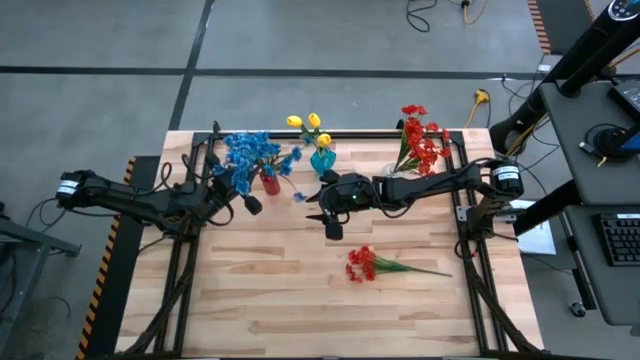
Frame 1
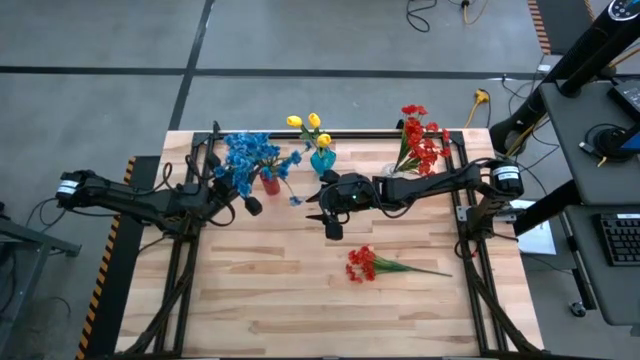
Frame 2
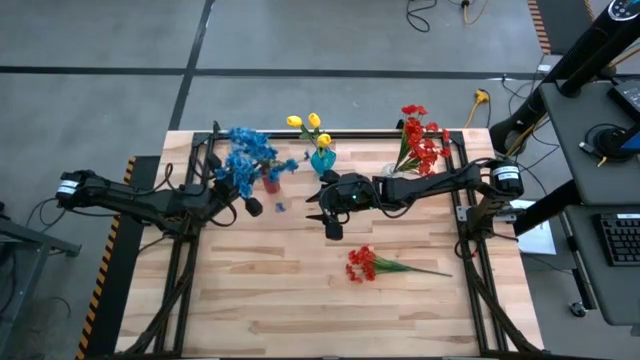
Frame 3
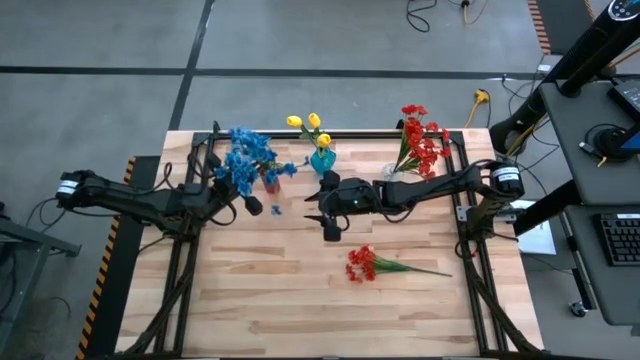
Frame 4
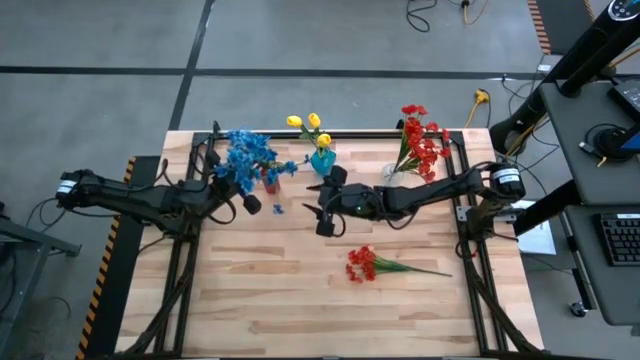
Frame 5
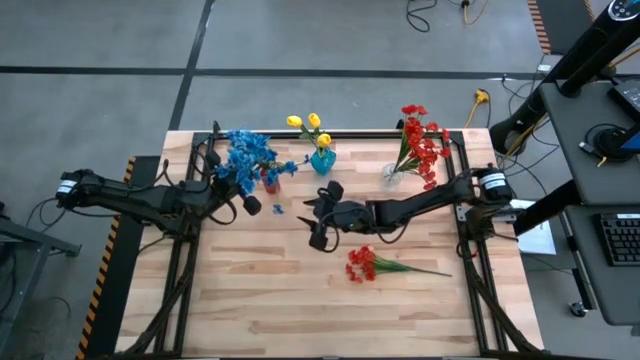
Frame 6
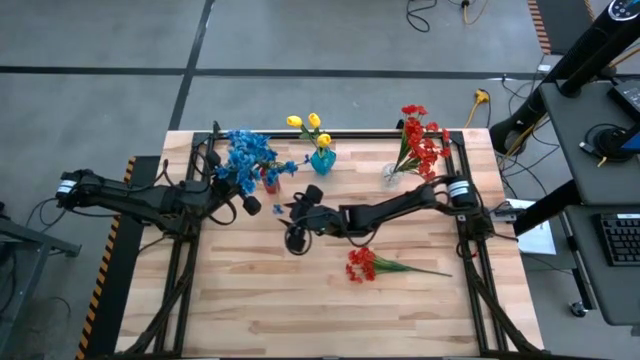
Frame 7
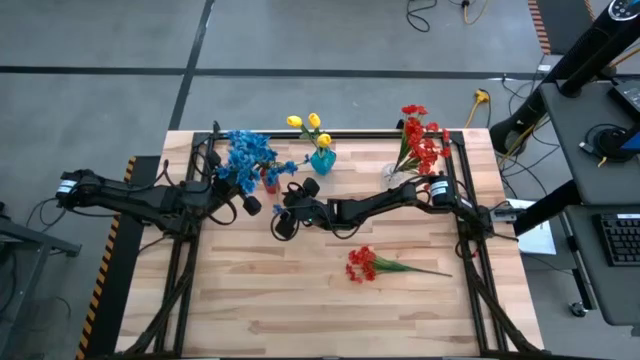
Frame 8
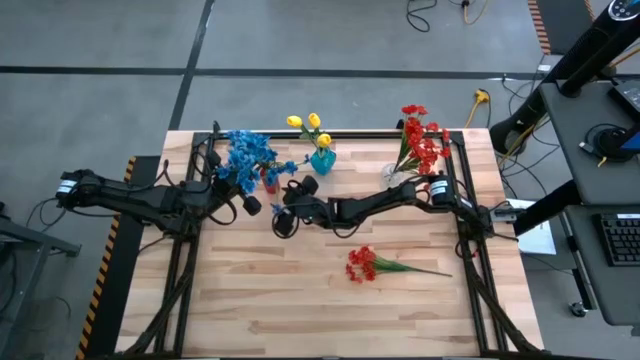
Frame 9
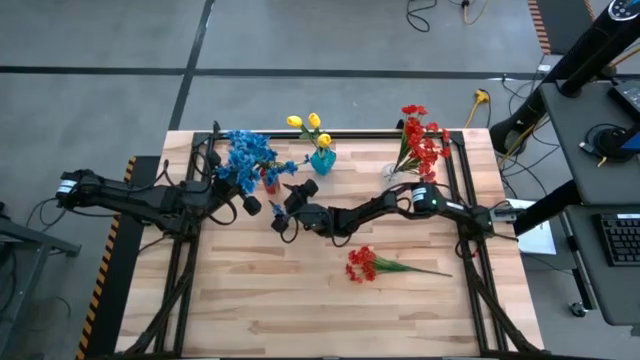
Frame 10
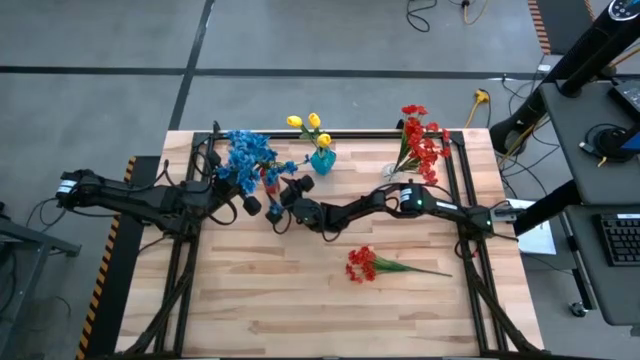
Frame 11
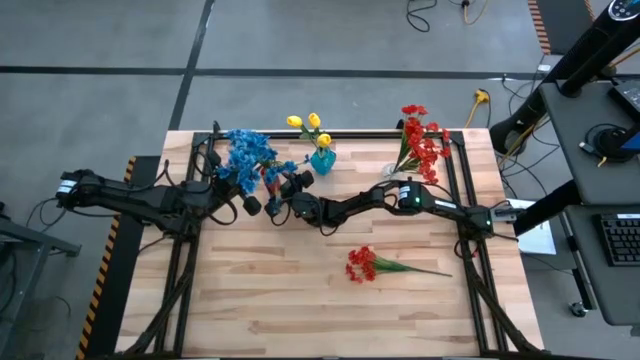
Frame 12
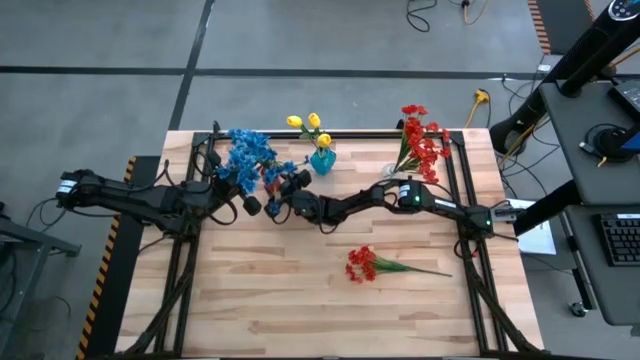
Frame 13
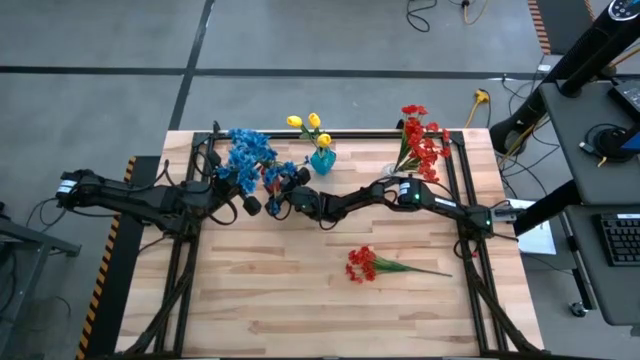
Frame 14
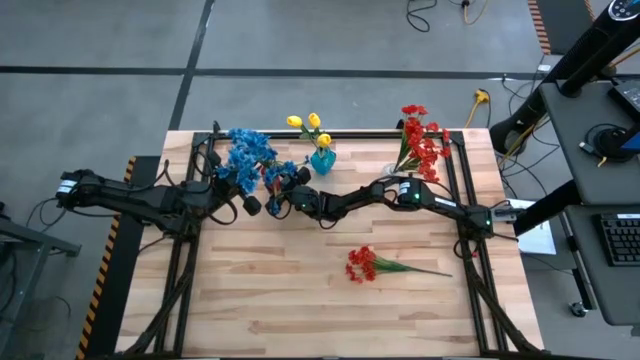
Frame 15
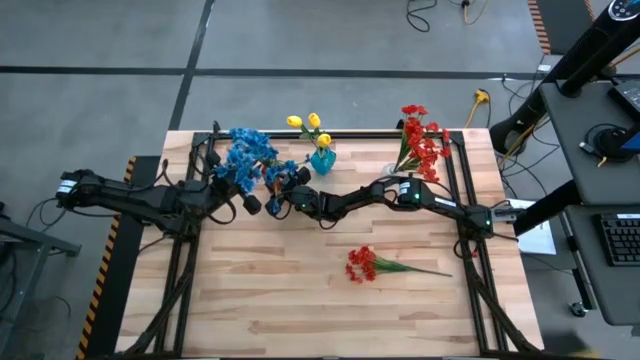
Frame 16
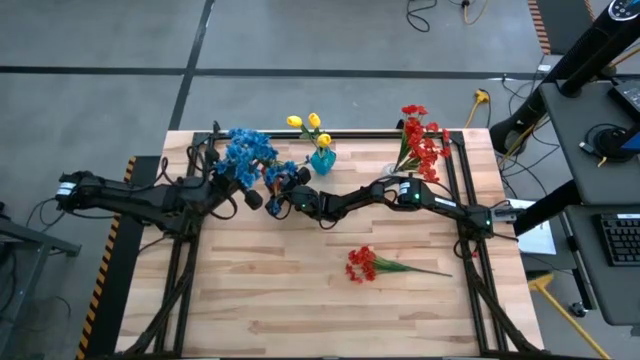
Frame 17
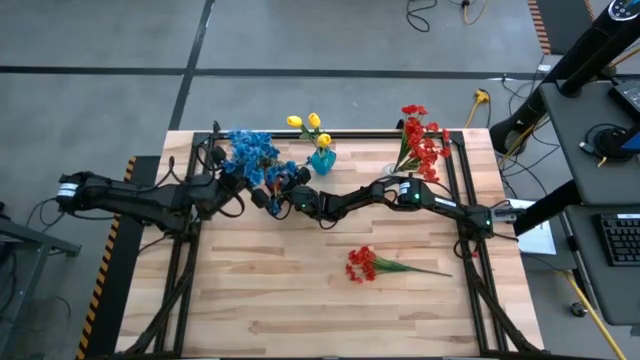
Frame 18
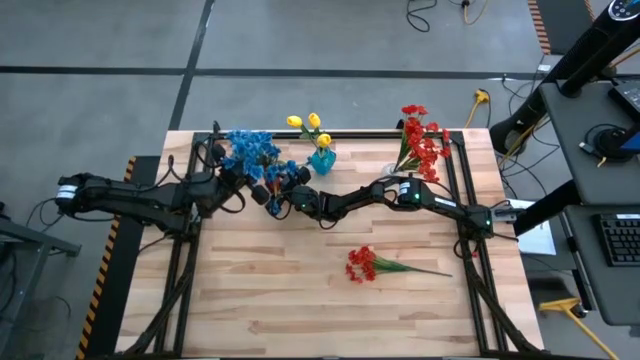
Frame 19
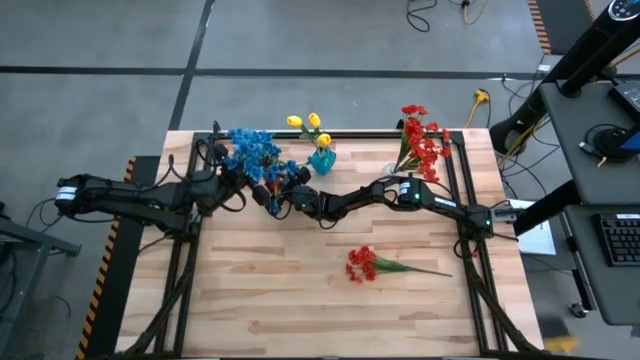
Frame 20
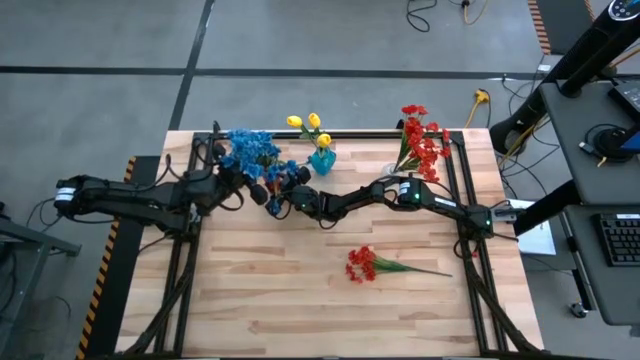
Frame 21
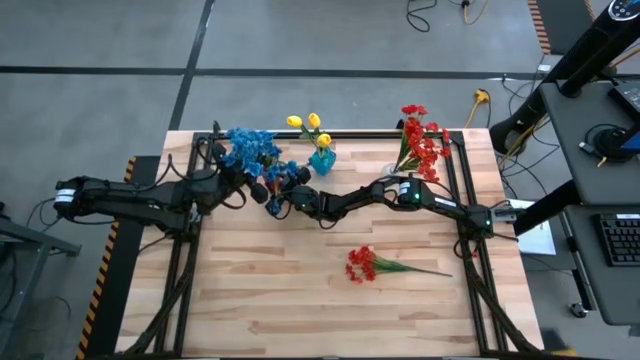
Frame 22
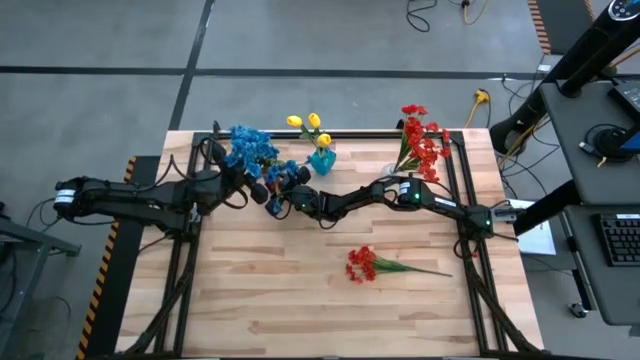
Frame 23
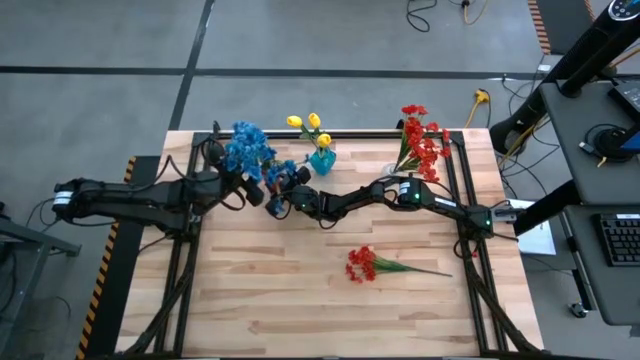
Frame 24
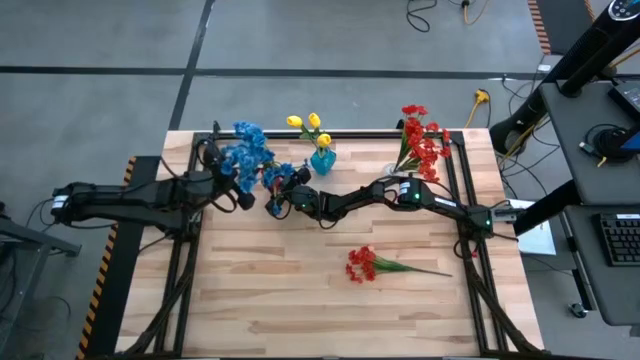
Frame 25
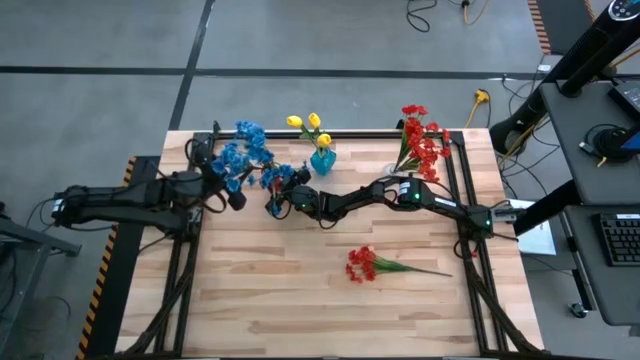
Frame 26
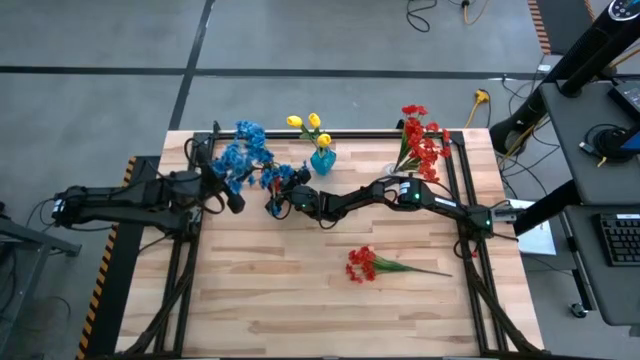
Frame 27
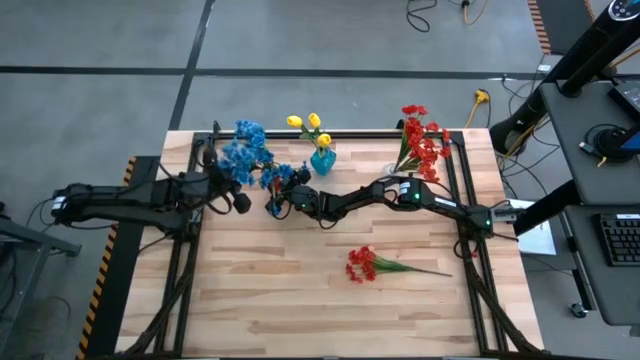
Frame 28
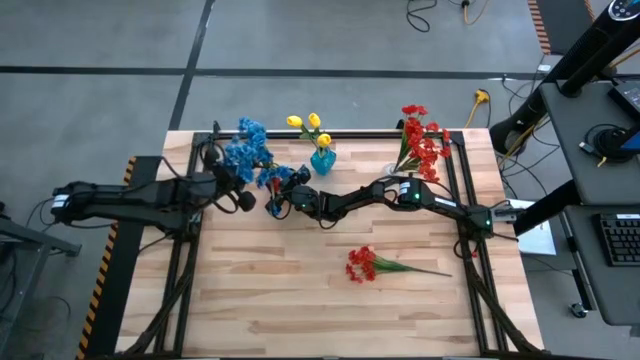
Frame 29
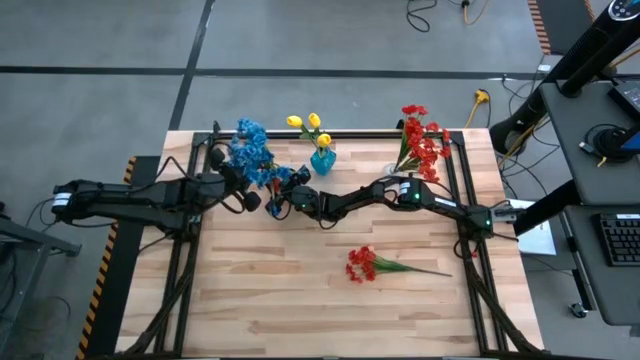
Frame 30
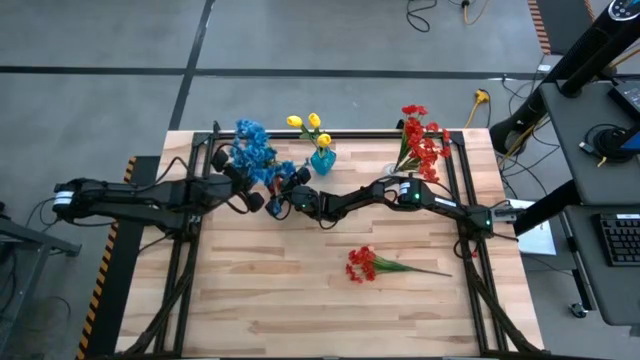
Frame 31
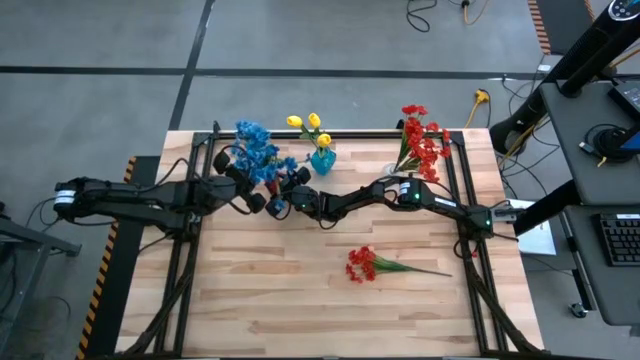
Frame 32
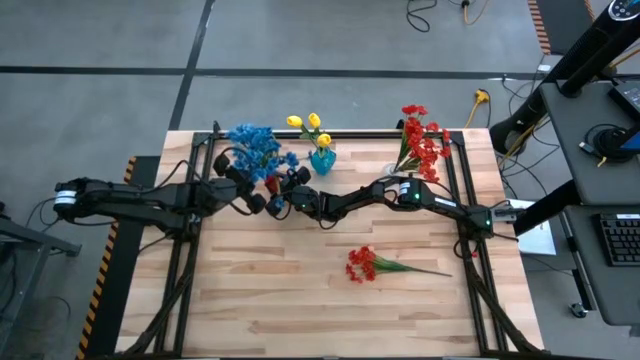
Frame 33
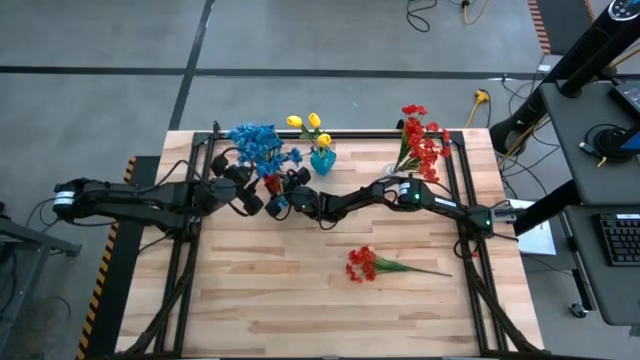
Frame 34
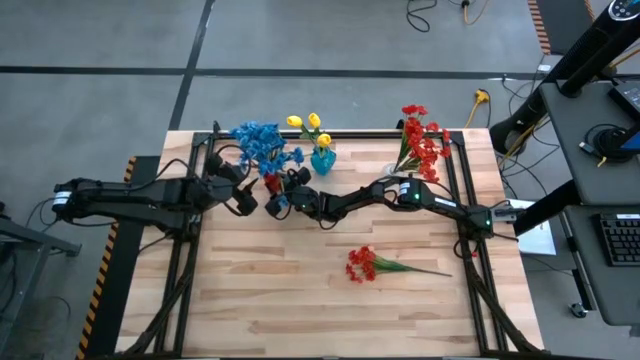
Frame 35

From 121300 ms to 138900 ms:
Task: Sort flowers into vase by color
Put the blue flower into the red vase
